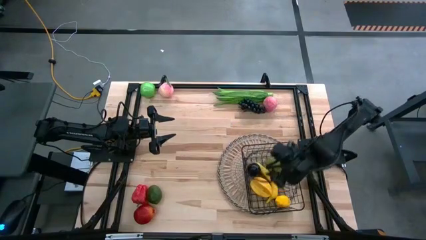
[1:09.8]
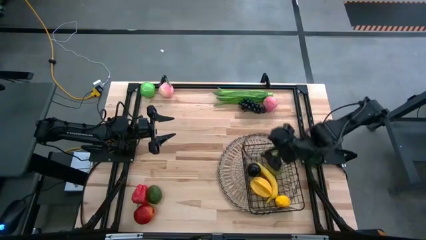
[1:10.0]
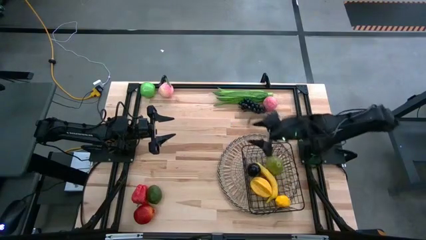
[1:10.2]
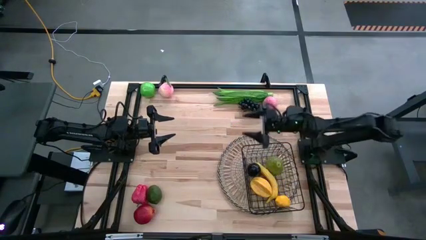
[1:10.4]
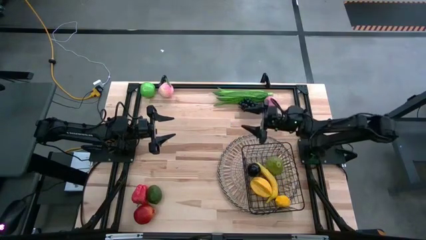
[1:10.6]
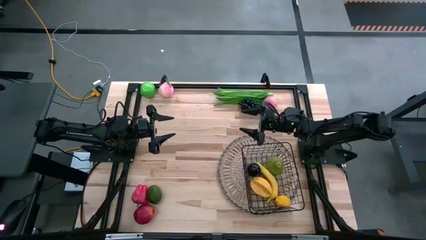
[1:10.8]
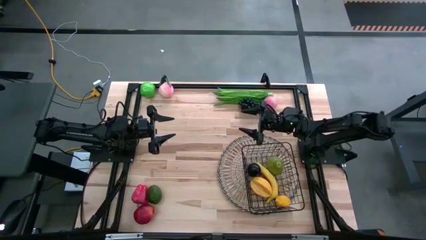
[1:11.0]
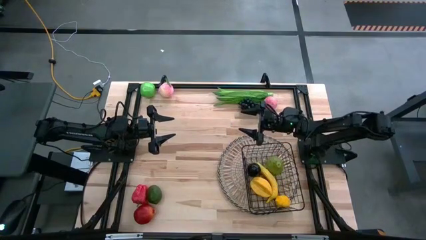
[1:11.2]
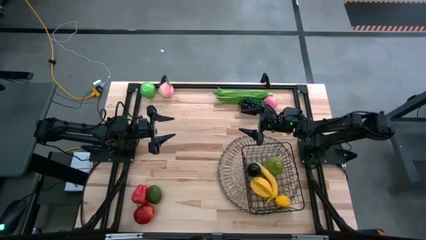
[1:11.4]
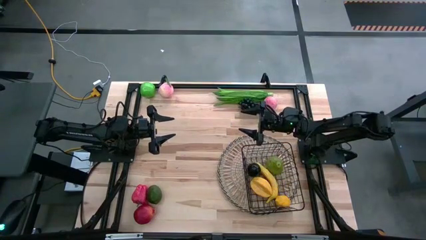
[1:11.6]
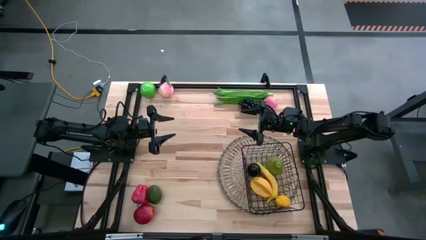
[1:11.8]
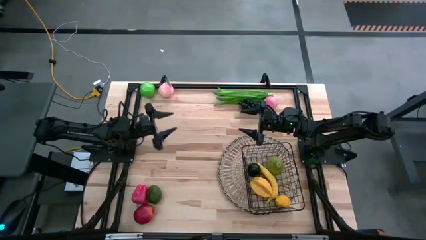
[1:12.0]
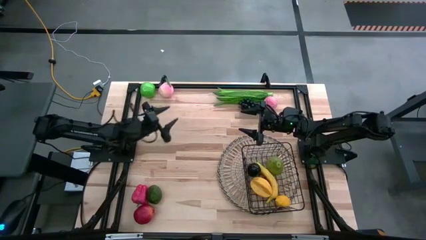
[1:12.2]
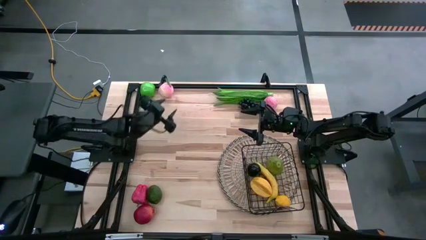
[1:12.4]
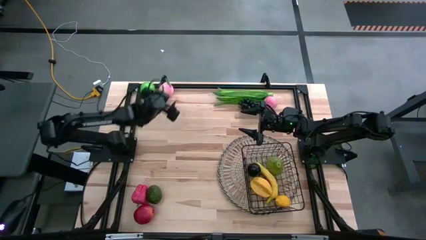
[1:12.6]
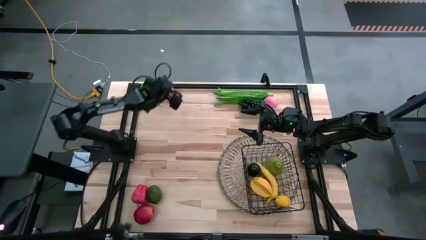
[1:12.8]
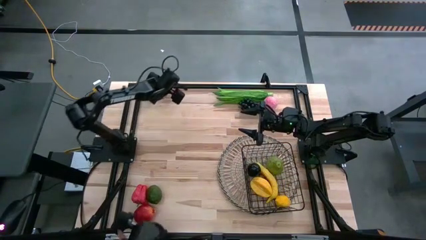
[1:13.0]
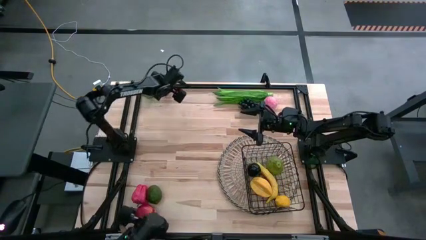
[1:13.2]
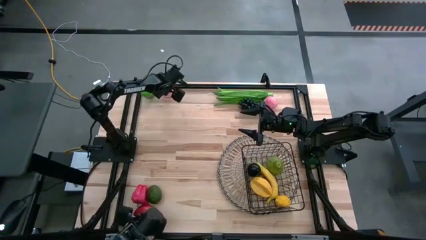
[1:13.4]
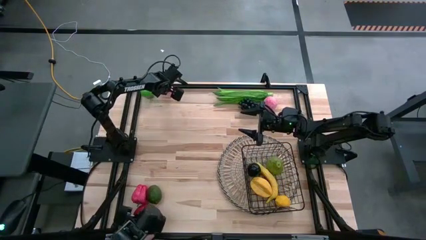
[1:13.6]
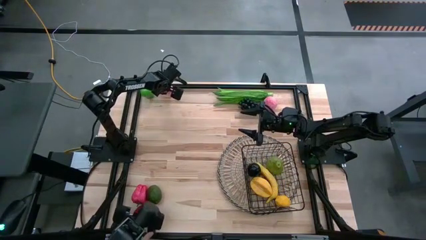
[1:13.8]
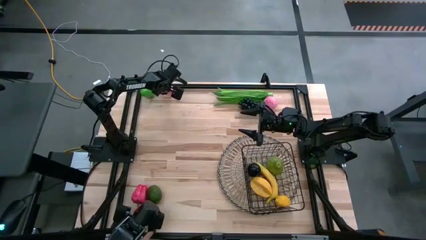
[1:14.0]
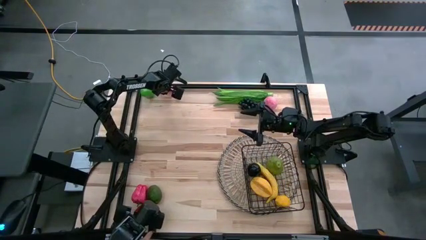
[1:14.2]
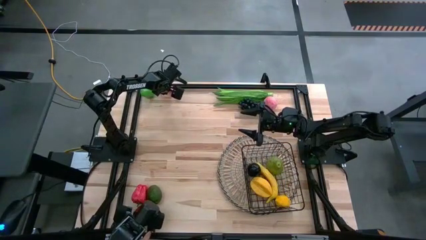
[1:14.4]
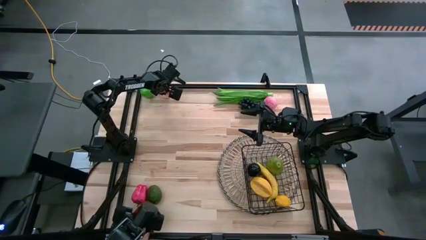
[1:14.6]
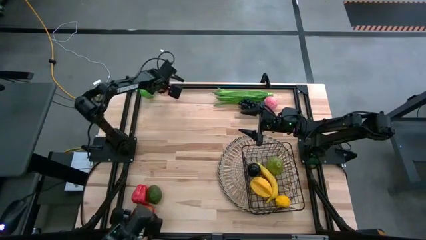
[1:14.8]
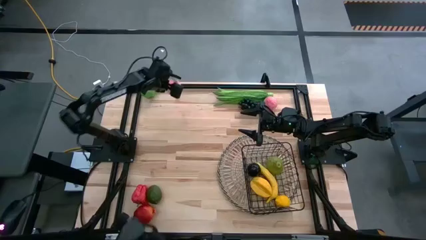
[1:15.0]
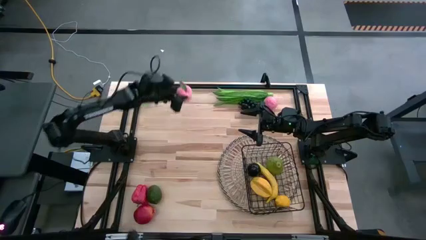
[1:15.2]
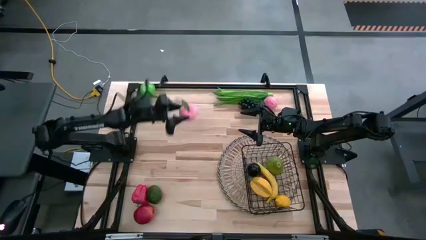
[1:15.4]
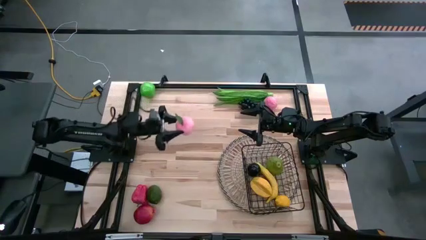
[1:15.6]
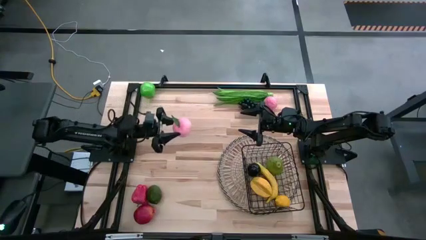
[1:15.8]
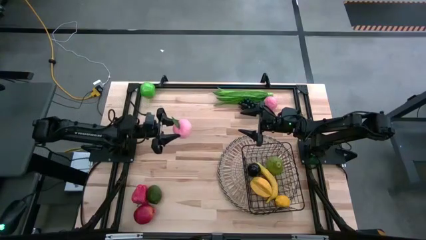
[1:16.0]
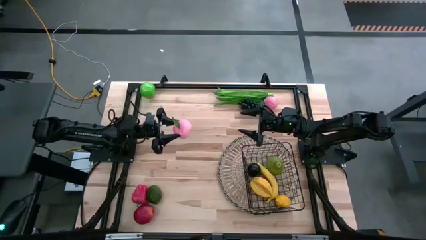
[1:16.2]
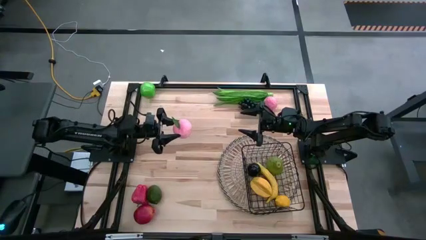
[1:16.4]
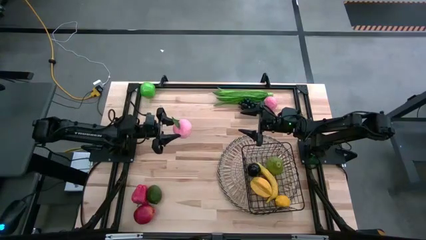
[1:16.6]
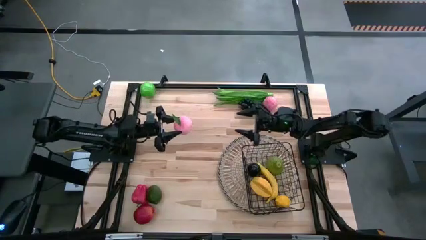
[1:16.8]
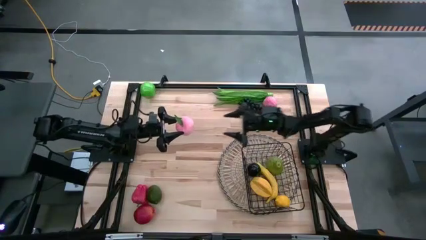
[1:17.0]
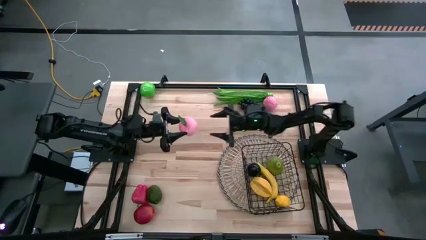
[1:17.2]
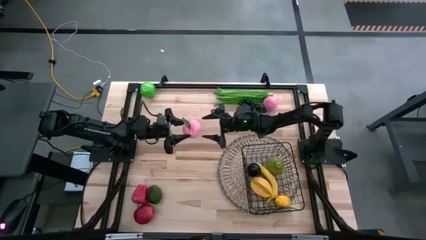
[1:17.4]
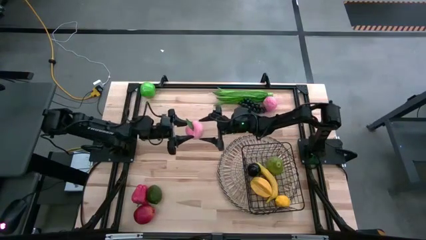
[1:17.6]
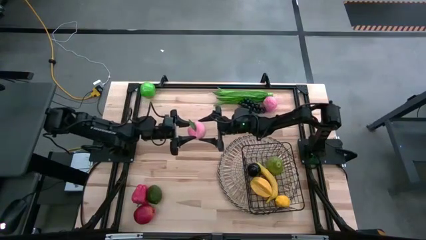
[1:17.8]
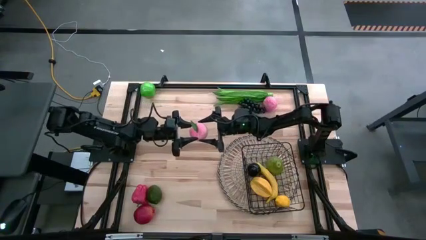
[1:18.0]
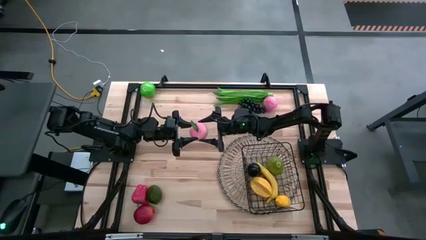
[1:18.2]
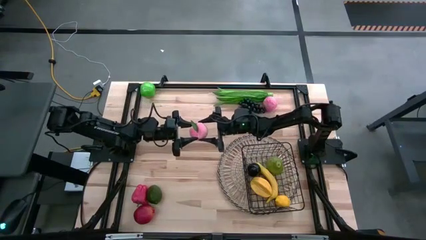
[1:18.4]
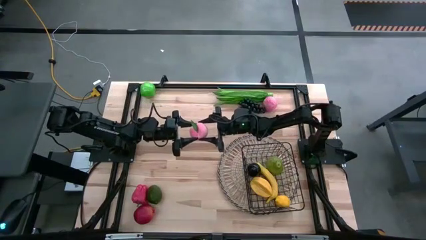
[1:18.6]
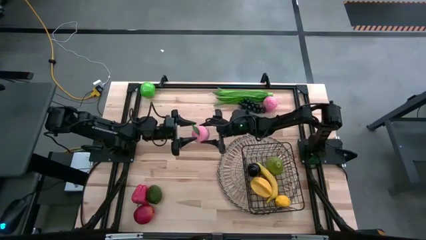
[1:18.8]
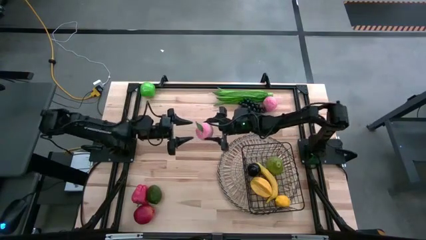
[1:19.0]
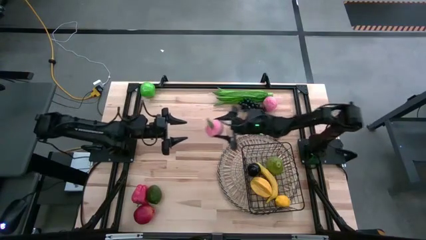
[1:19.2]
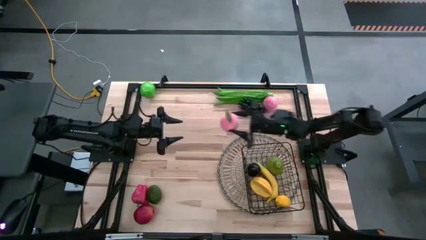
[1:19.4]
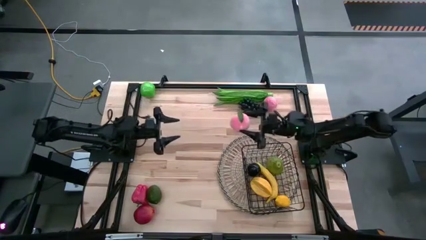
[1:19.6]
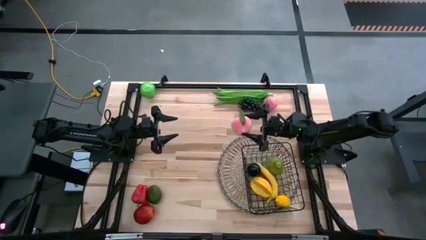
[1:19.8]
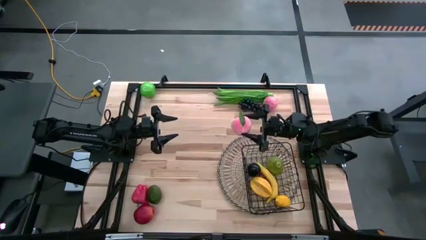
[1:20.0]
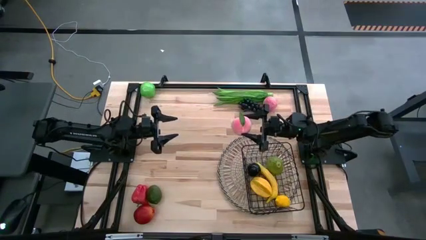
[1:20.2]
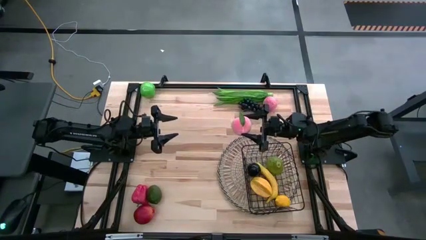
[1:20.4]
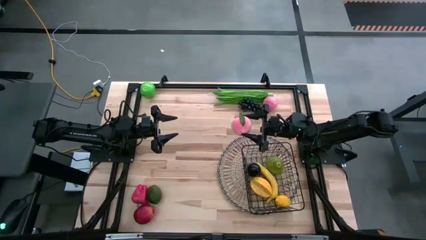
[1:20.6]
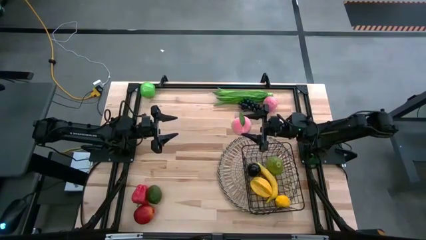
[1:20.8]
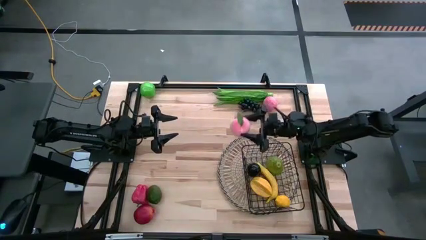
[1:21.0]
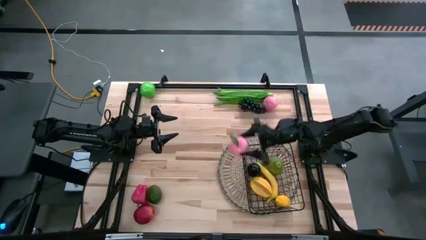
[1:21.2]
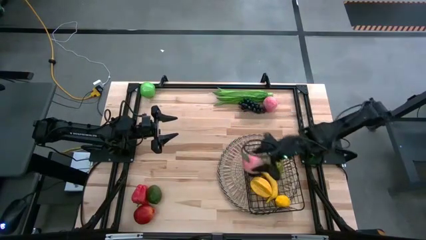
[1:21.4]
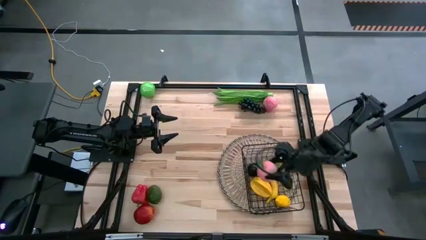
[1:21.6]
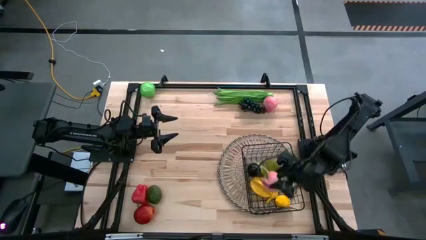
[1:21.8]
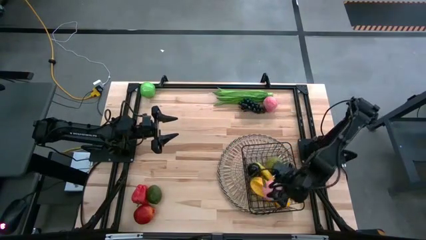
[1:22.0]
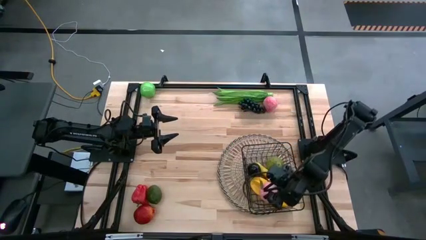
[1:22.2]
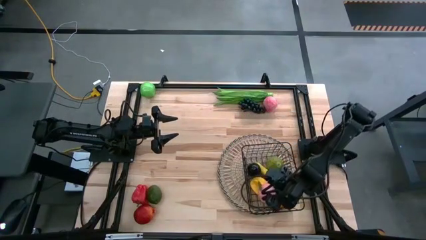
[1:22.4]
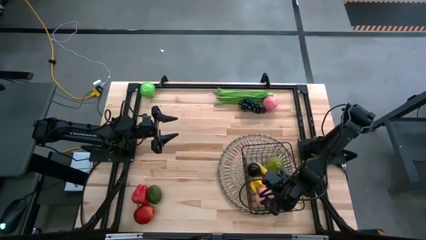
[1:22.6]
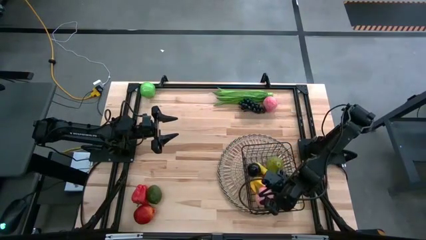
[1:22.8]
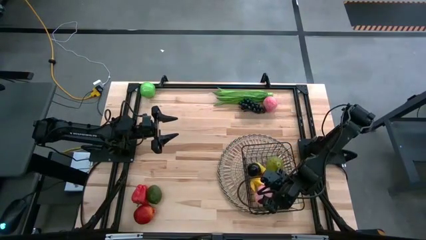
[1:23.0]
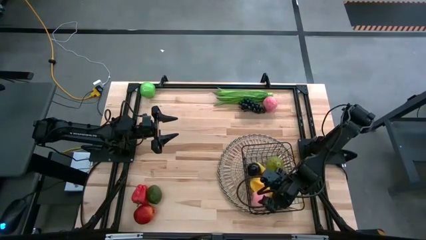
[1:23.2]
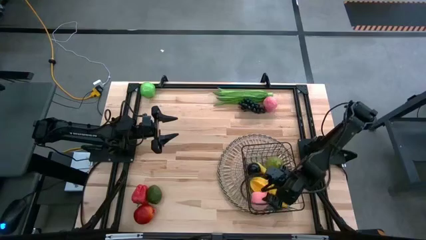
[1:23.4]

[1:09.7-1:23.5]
Task: Build produce basket
Put the left peach into the wire basket
